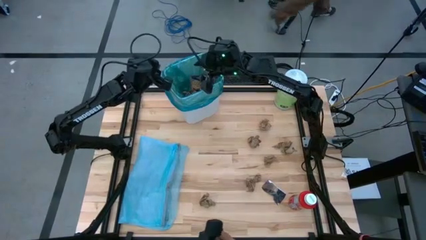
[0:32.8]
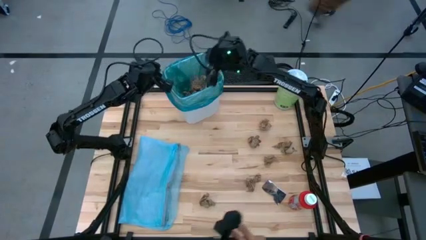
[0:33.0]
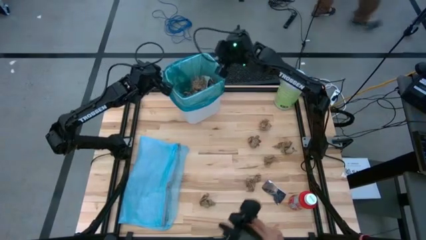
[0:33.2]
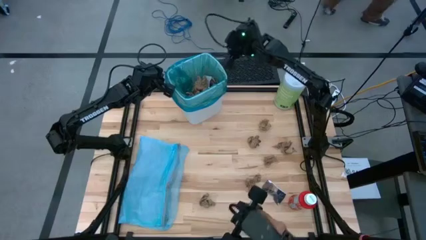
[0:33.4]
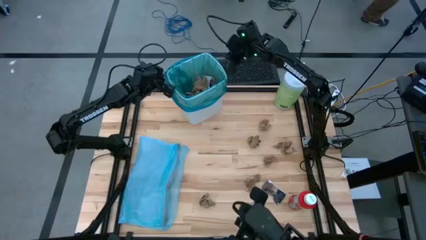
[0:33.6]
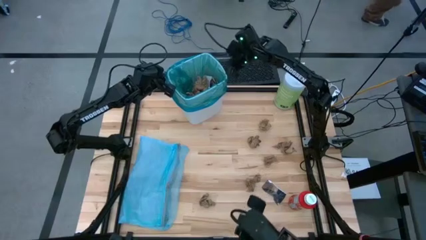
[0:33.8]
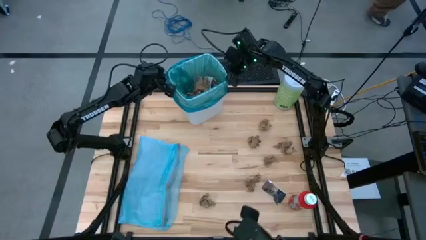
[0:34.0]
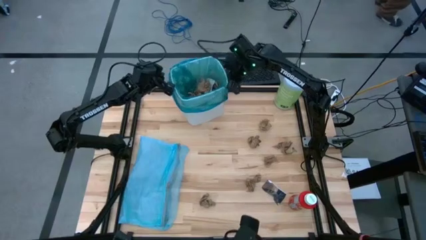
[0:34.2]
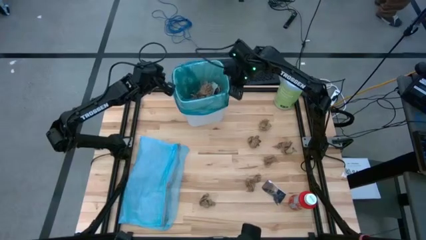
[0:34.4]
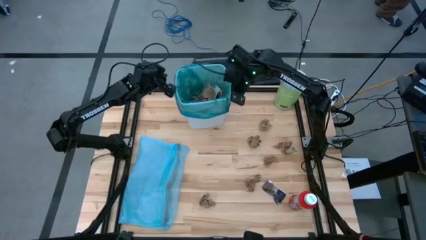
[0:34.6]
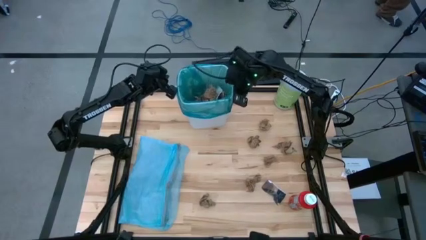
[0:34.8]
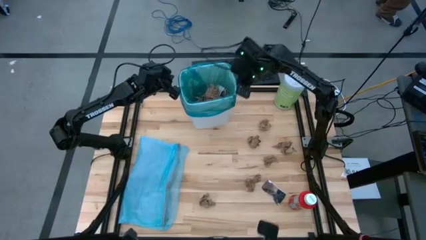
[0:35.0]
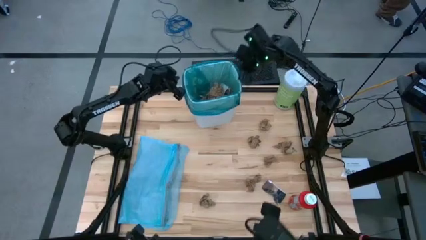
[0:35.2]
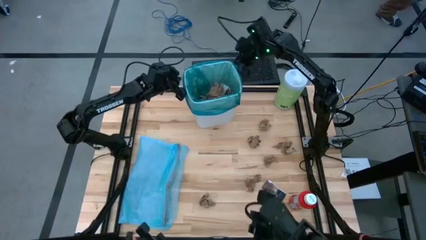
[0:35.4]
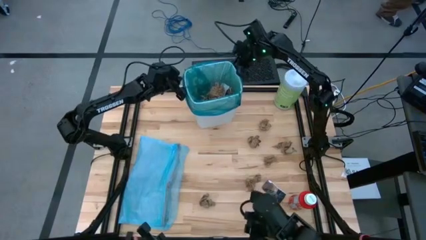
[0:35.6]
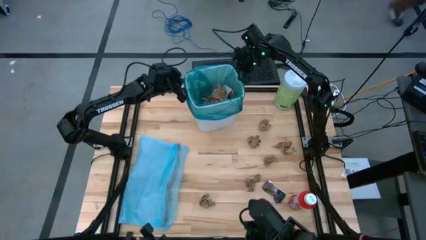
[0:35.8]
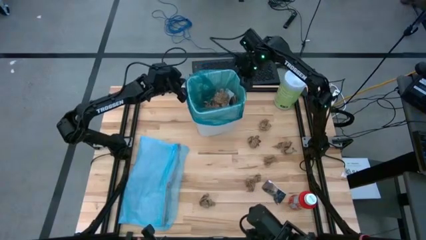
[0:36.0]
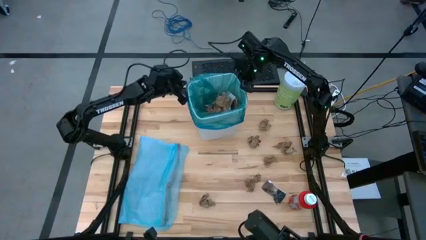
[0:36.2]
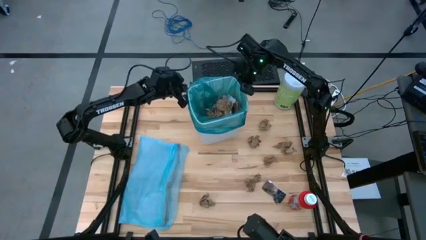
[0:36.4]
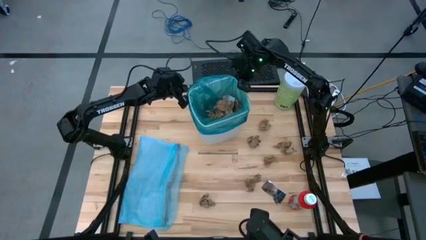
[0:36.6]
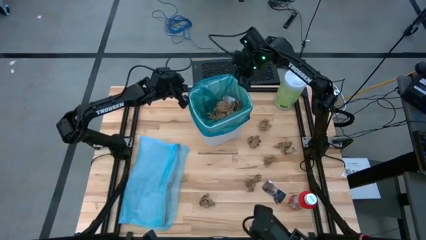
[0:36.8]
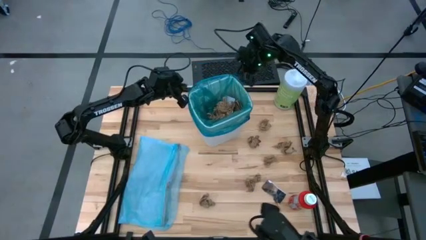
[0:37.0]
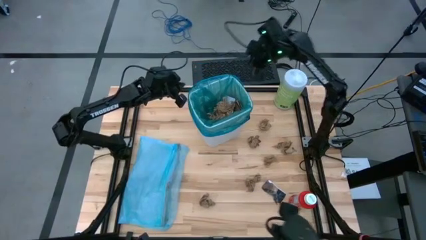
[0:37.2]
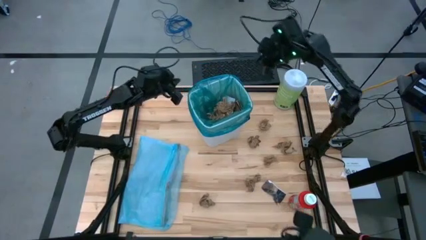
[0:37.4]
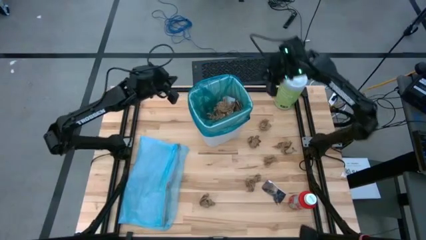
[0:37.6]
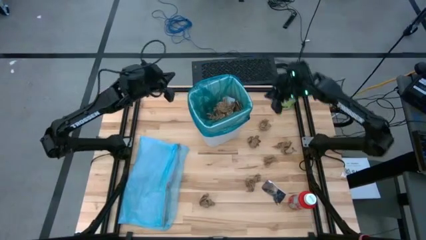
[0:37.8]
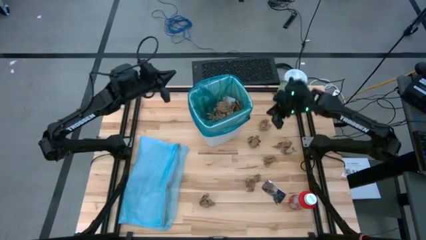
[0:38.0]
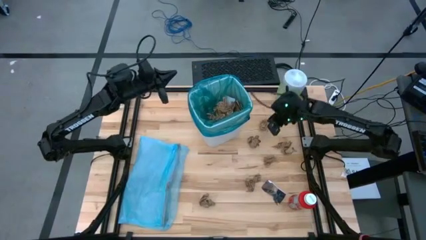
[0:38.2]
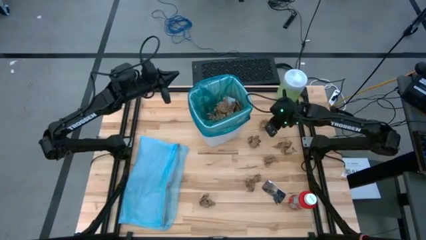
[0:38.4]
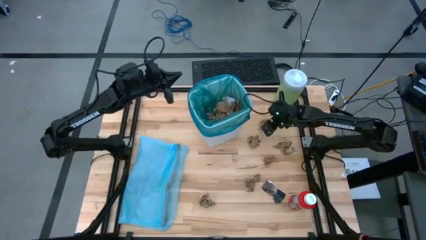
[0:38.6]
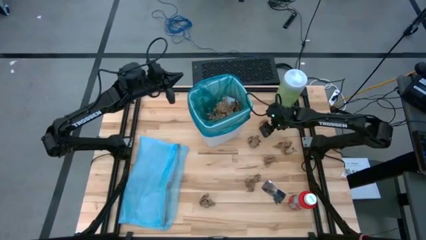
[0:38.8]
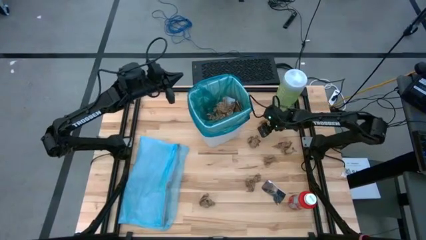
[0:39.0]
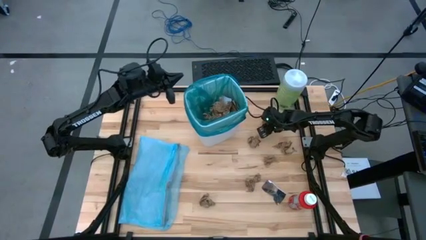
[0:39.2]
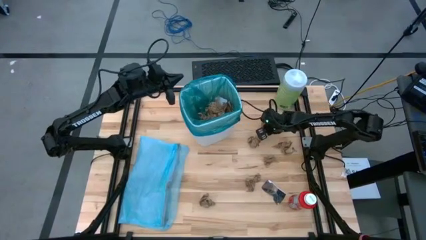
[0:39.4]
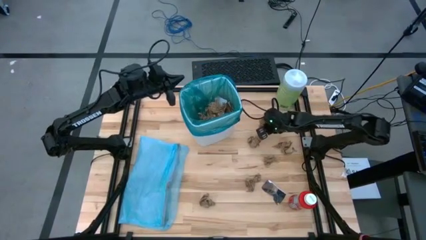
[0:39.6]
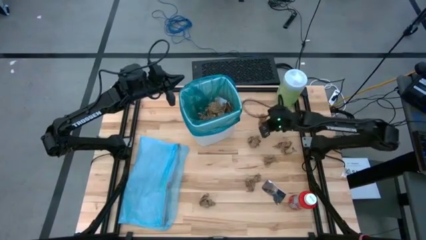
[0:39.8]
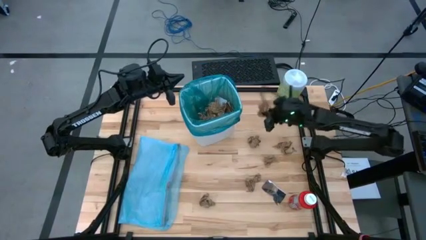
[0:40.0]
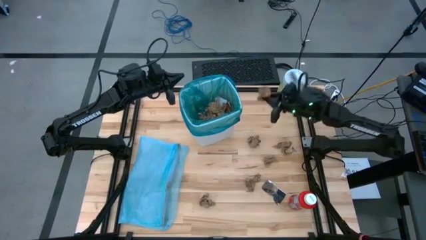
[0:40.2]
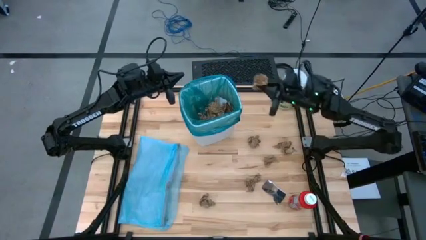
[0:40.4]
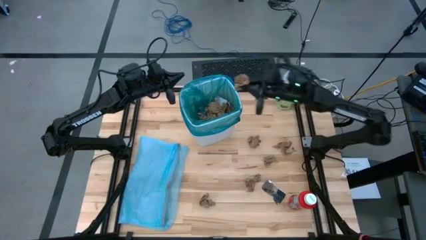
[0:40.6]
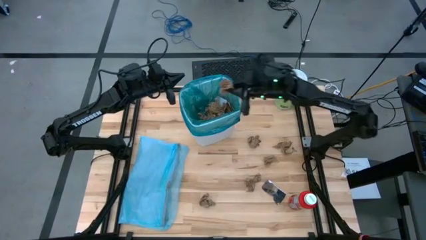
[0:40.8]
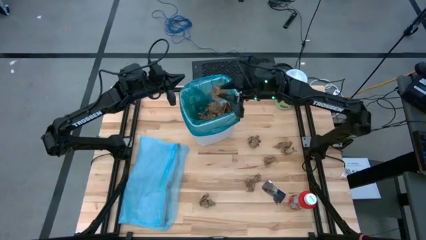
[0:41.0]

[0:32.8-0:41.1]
Task: place trash/remove bag and relplace
Put the brown paper into the blue trash bag inside the white trash bin

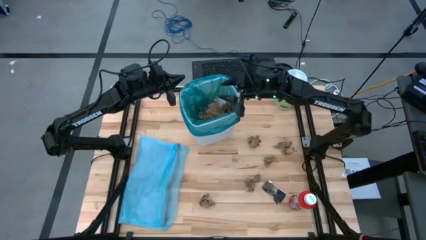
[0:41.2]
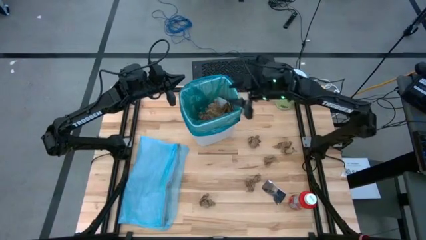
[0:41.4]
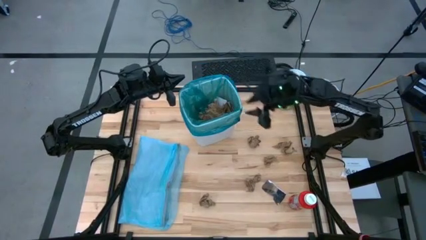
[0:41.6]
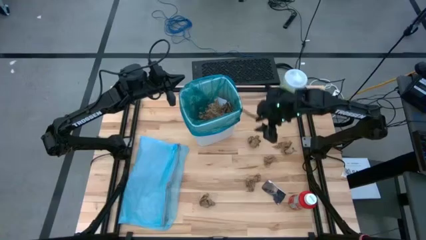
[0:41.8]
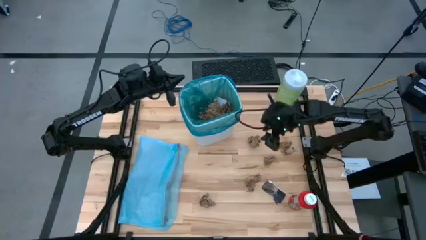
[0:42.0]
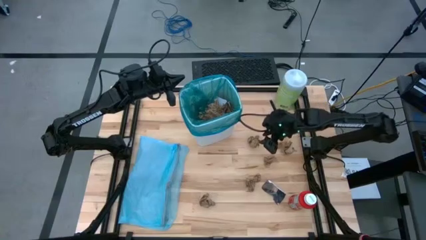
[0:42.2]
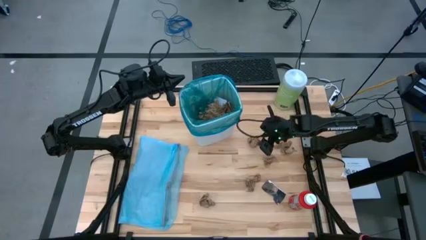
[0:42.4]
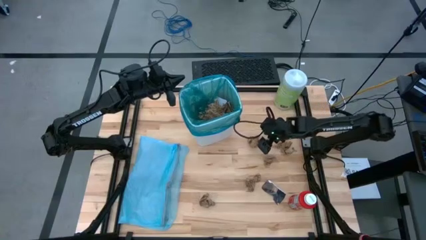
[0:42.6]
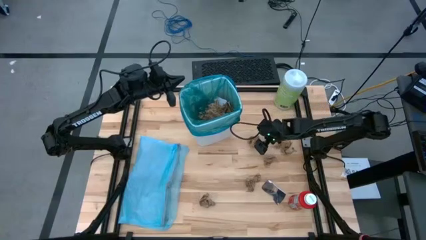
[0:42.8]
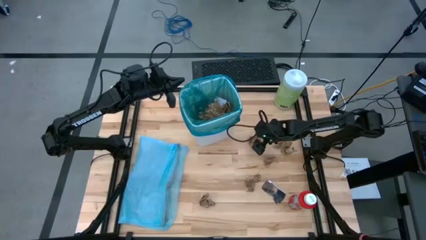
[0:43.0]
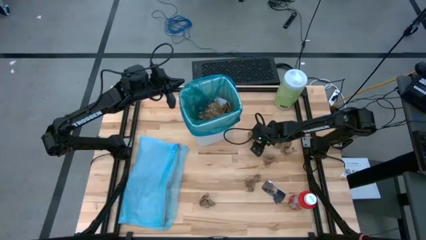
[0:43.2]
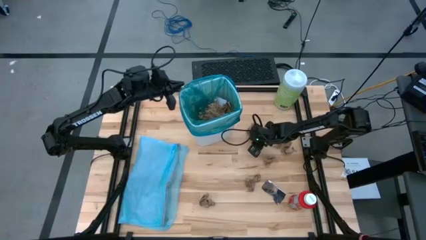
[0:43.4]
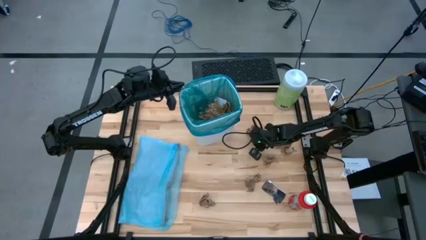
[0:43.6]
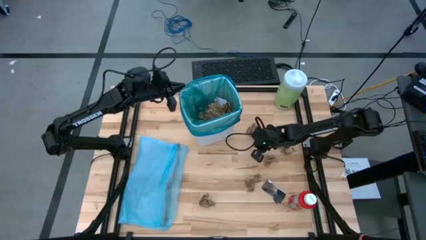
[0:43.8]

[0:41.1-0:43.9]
Put the brown paper into the blue trash bag inside the white trash bin

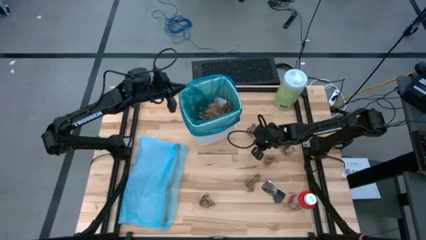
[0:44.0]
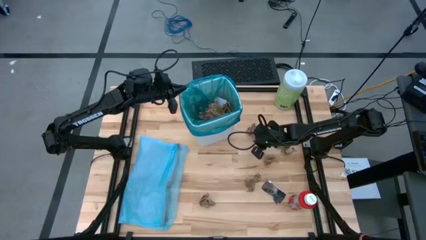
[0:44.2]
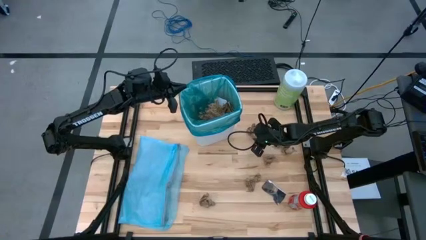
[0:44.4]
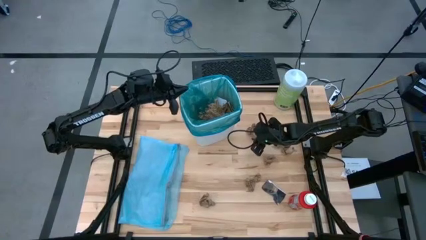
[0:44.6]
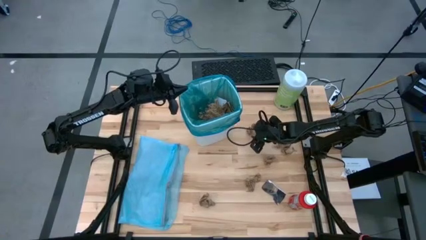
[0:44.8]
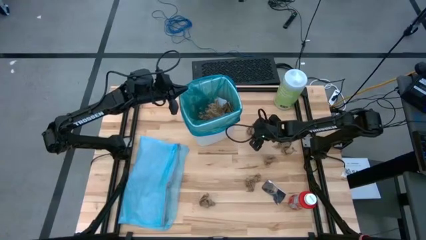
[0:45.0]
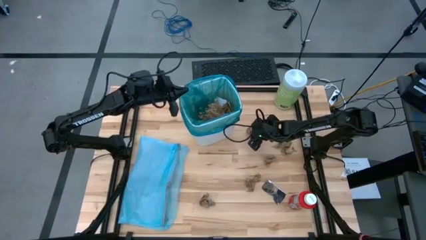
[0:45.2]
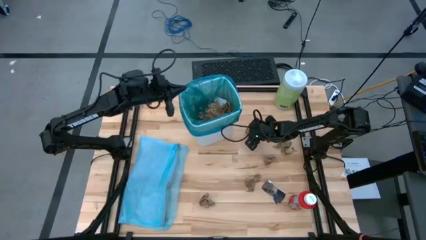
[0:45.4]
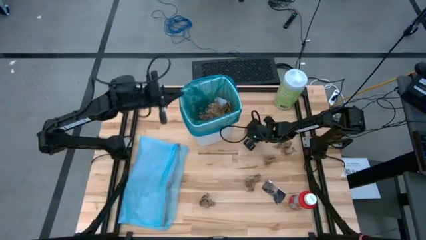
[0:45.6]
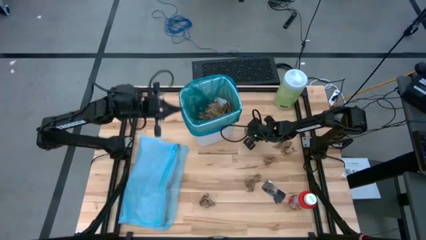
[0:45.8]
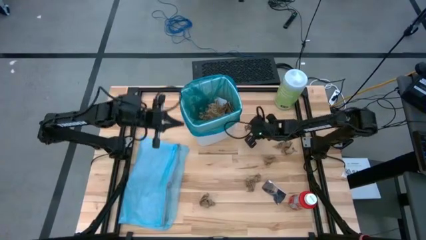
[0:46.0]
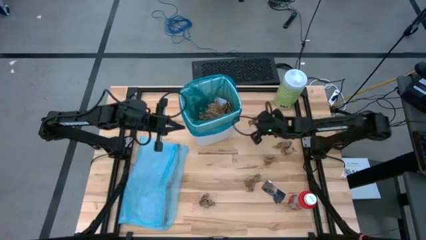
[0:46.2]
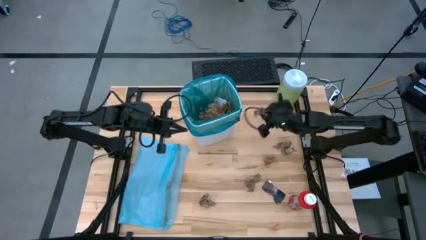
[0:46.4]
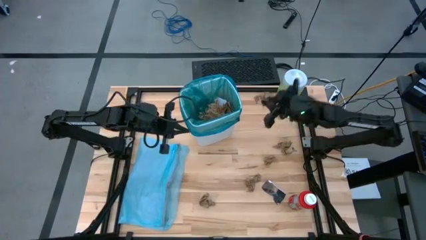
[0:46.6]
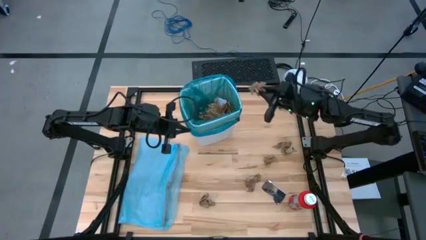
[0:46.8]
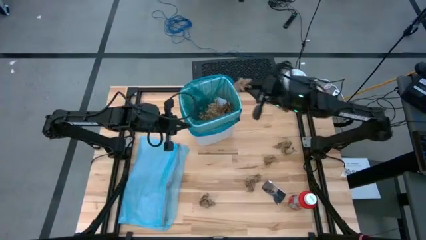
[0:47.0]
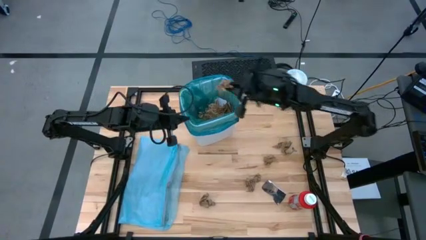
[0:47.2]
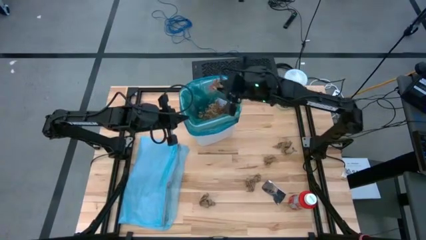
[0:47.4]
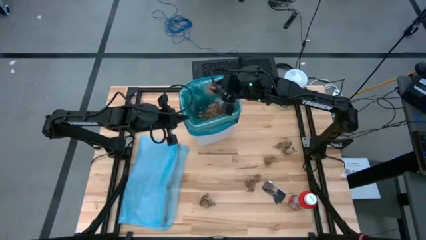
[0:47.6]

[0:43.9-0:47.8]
Put the brown paper into the blue trash bag inside the white trash bin

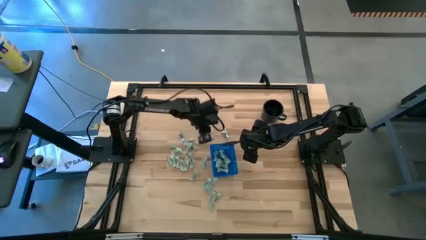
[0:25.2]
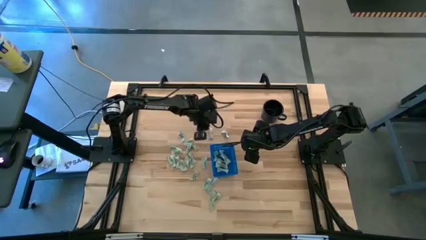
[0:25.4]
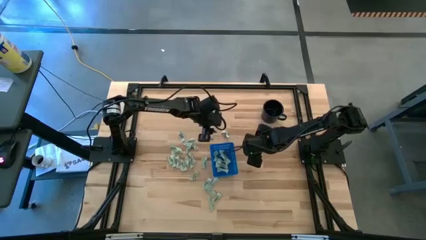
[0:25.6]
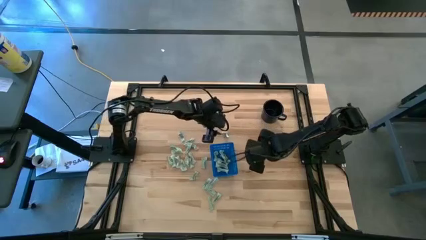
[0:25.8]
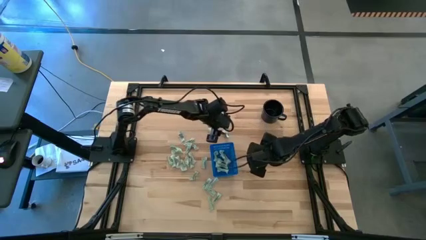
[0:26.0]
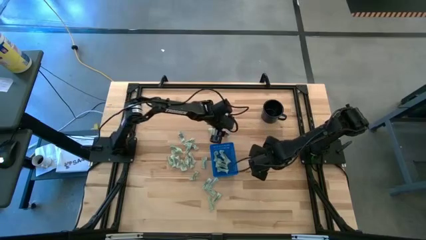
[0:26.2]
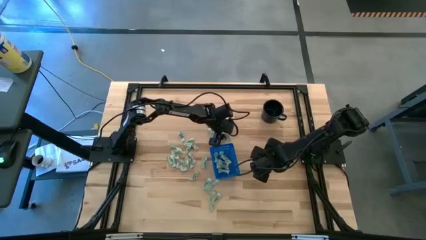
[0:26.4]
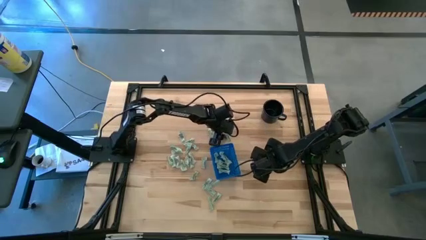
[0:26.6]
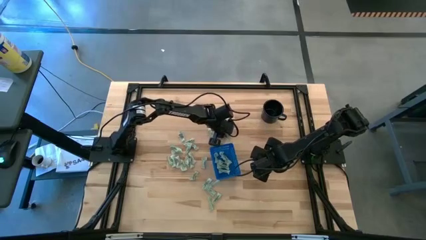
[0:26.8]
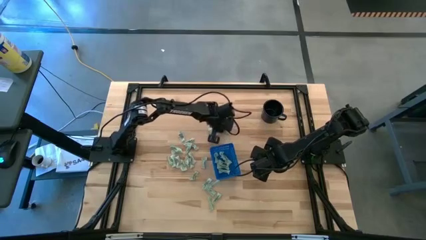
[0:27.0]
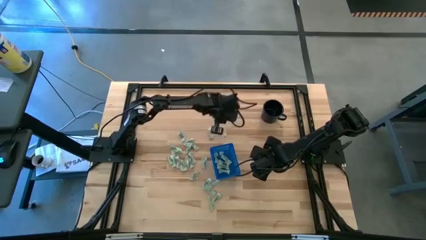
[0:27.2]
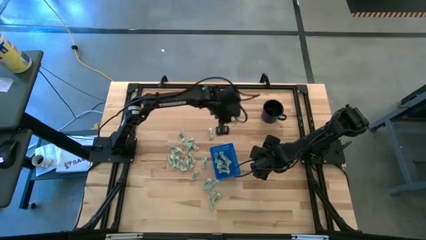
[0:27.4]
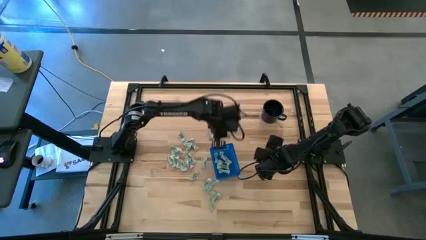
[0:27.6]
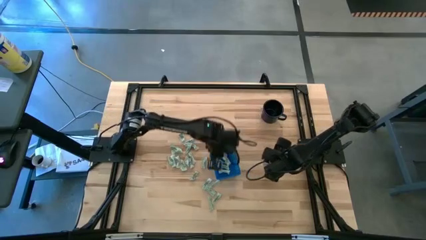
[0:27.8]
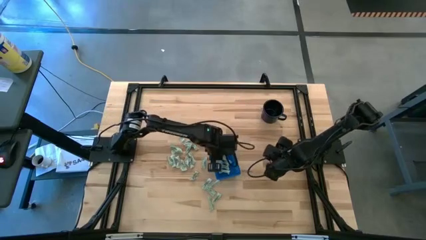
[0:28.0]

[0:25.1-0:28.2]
Task: Pick and place Stevia / Truvia into bins
Put the stevia packet into the basket
